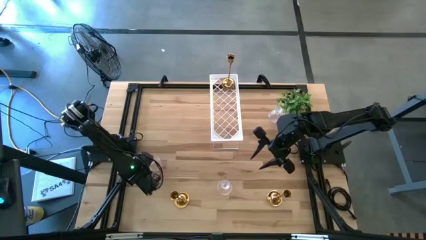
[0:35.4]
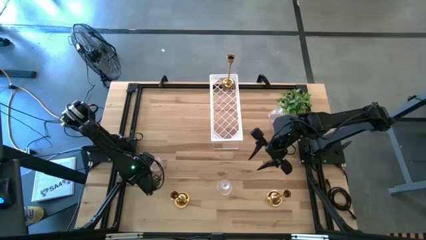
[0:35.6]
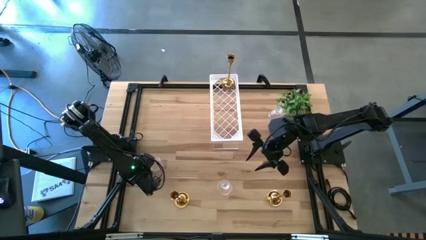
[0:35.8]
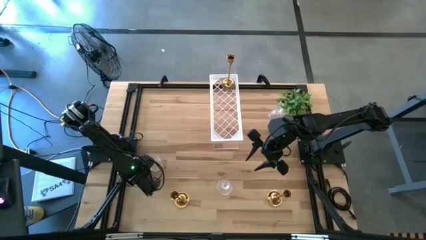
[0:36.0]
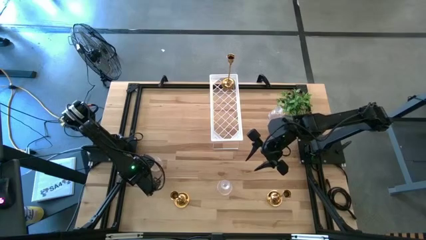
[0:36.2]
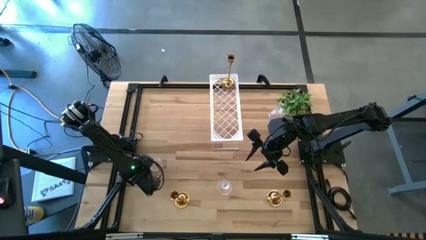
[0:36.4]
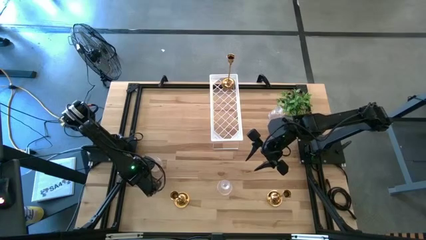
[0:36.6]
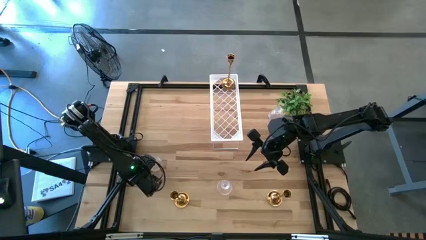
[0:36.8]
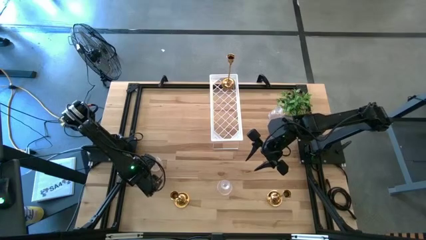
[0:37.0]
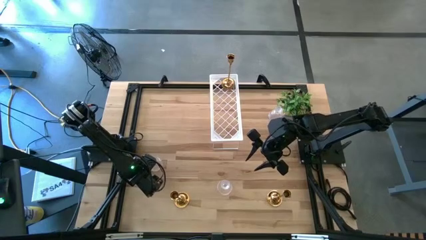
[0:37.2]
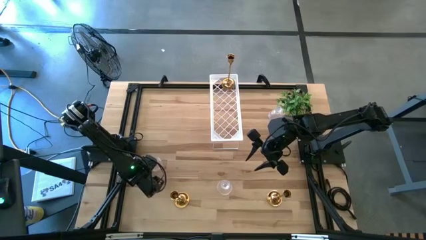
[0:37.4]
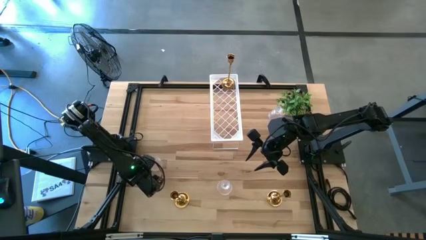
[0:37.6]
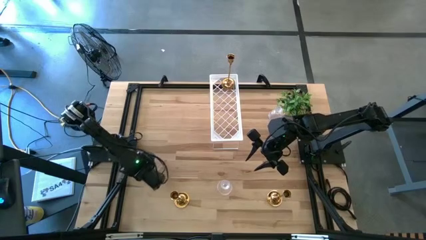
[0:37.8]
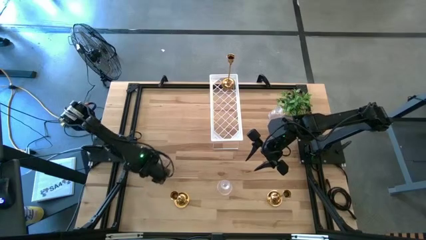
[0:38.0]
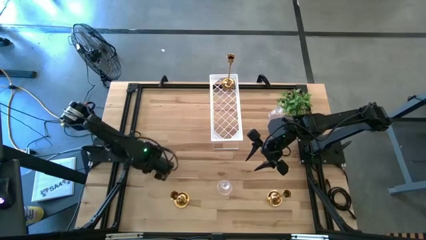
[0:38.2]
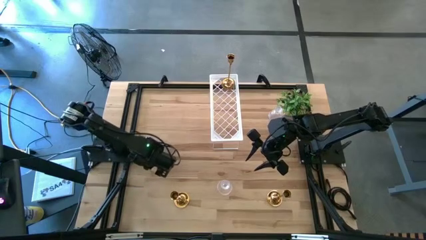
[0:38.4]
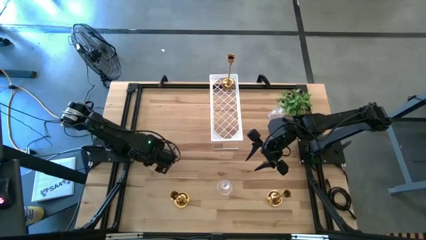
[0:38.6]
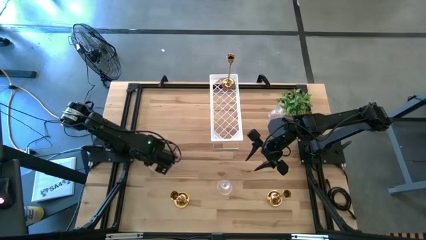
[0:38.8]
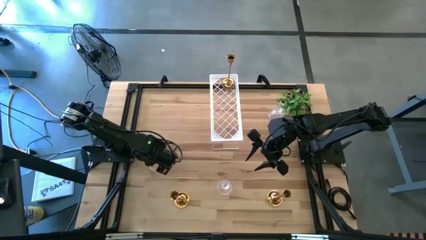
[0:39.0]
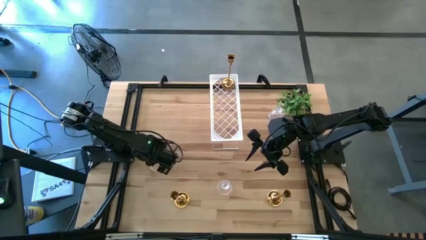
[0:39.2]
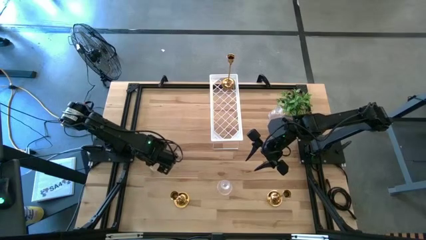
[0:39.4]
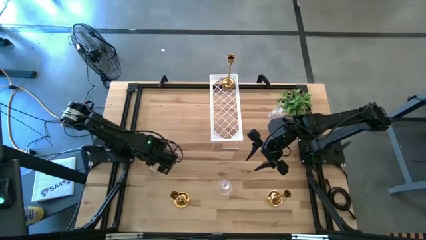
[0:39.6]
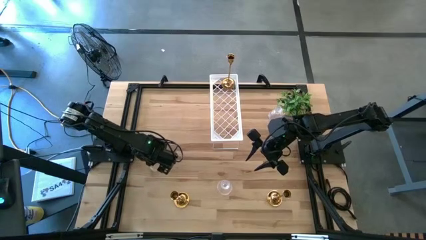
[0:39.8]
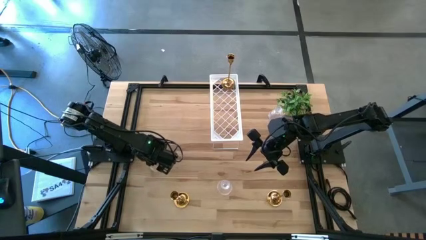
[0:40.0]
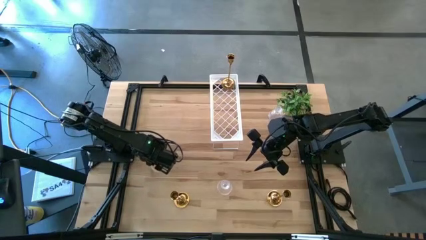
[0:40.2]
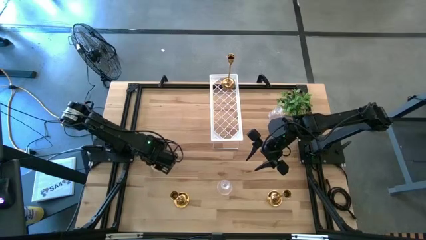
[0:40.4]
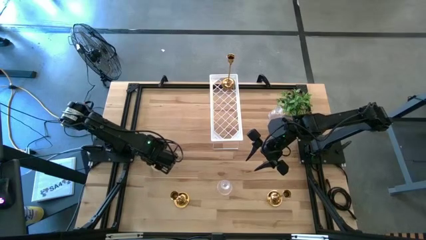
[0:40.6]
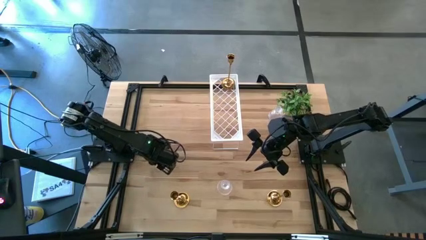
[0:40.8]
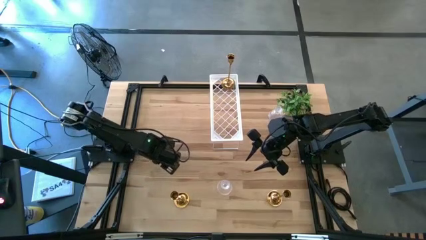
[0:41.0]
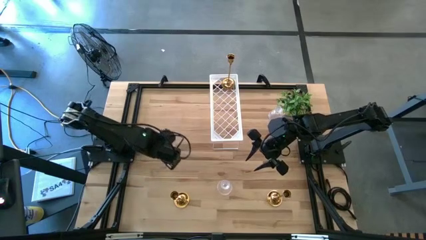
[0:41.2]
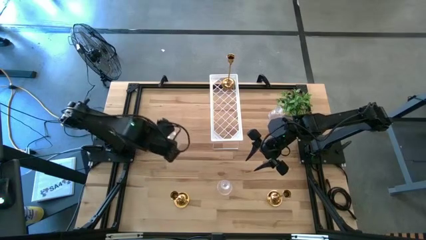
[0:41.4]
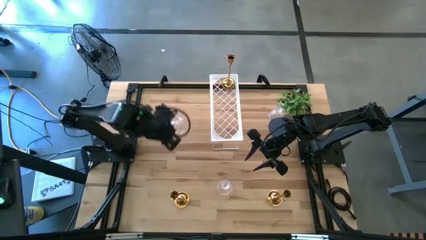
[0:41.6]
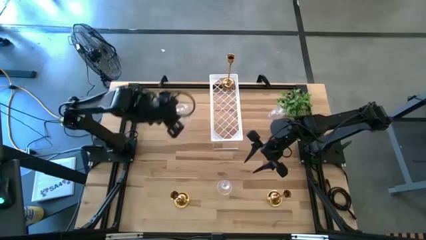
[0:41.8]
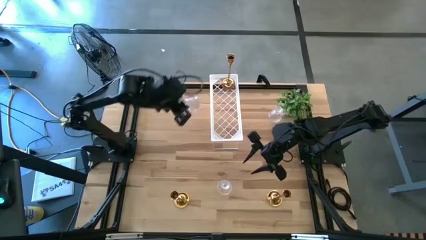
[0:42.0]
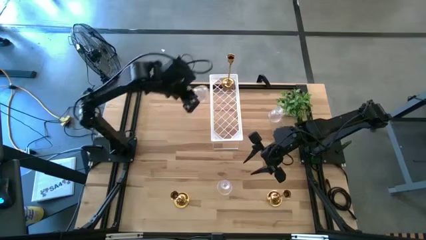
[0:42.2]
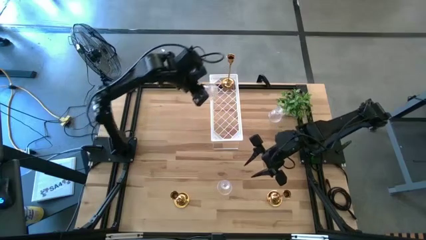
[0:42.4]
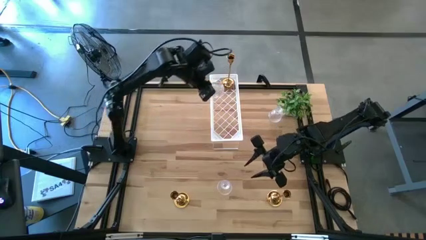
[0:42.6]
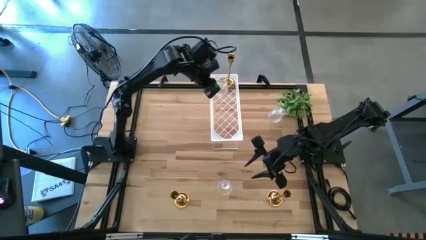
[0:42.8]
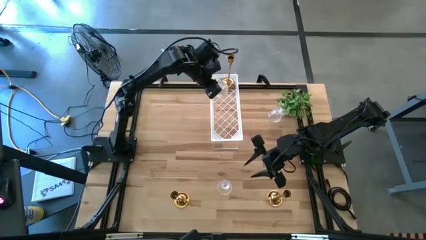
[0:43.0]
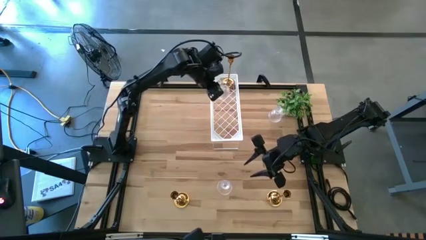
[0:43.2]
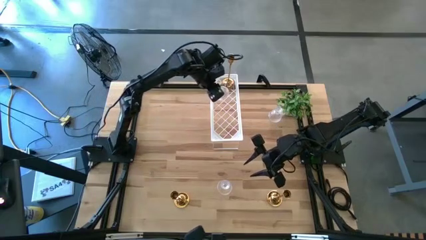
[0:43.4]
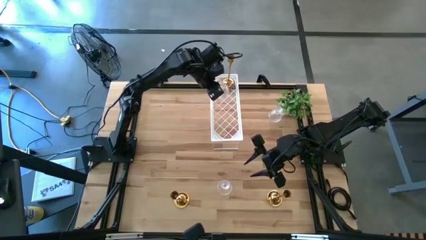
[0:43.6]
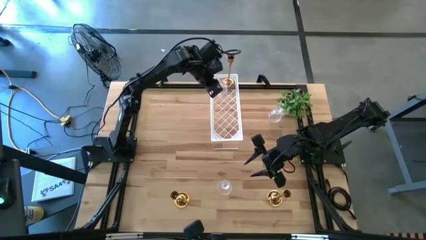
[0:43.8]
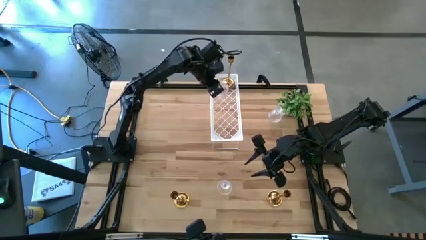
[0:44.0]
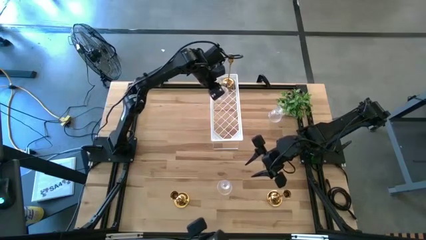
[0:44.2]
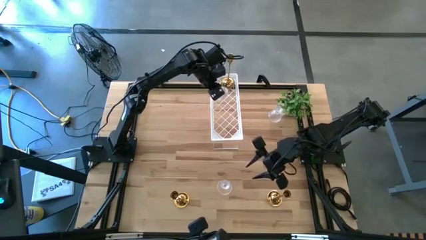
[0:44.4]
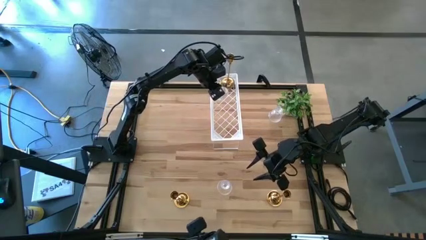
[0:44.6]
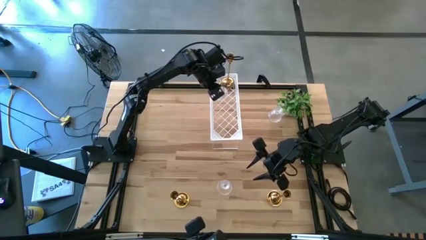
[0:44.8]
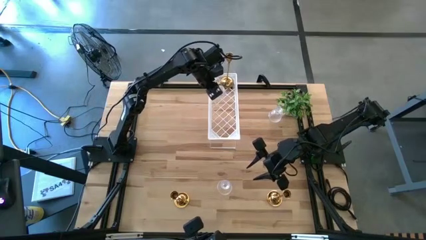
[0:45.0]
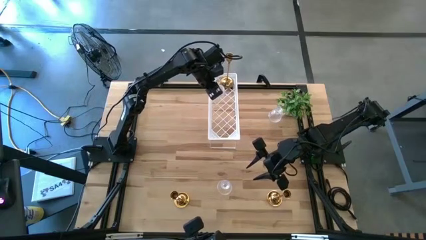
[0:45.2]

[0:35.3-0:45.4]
Task: Pick & Place candle stick holders
Put the left transparent candle holder on the shelf
